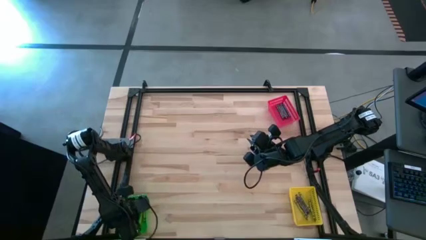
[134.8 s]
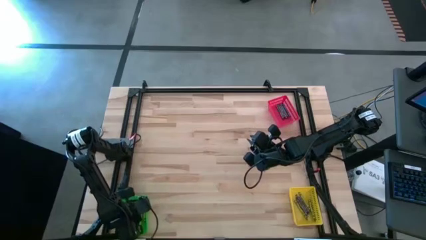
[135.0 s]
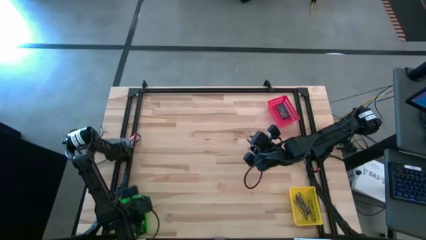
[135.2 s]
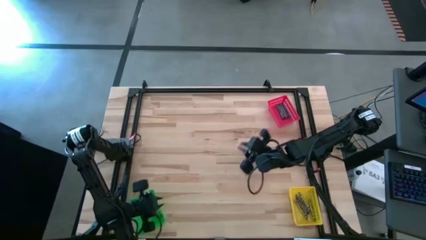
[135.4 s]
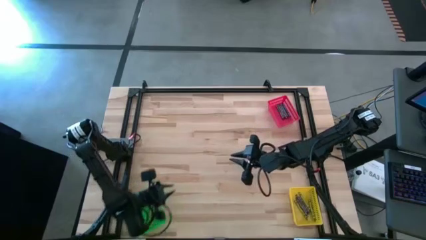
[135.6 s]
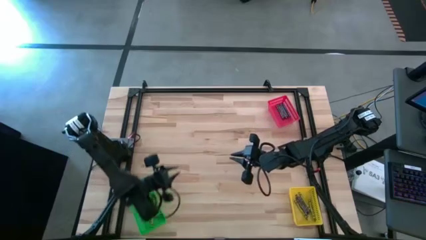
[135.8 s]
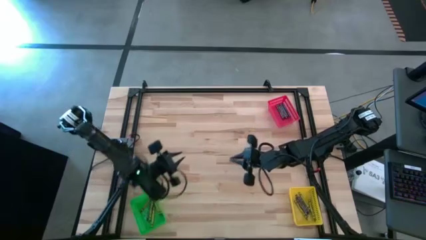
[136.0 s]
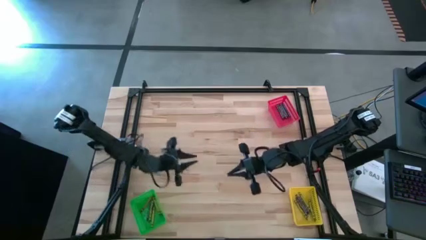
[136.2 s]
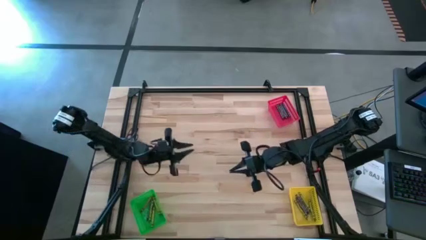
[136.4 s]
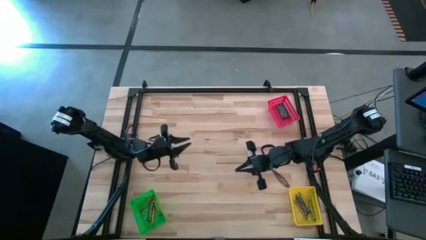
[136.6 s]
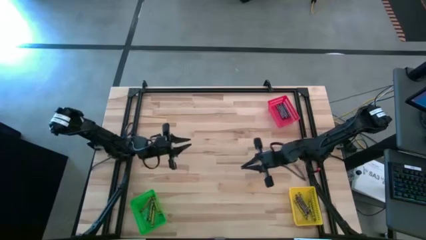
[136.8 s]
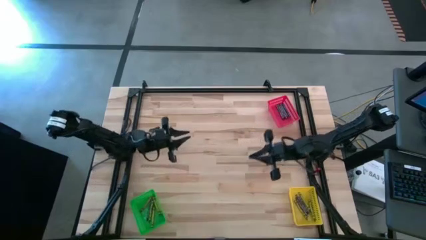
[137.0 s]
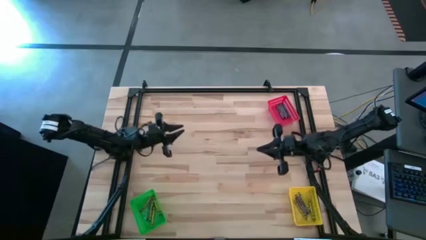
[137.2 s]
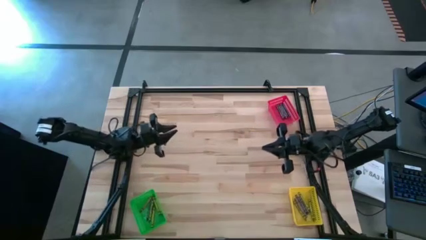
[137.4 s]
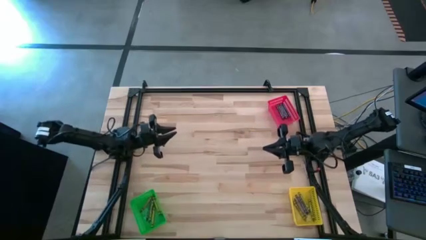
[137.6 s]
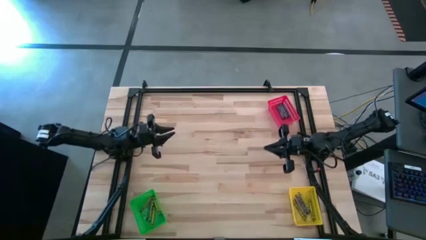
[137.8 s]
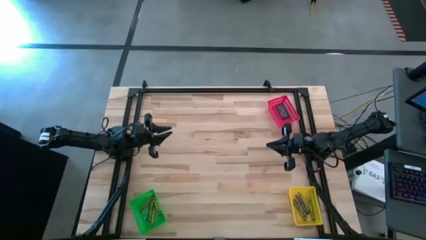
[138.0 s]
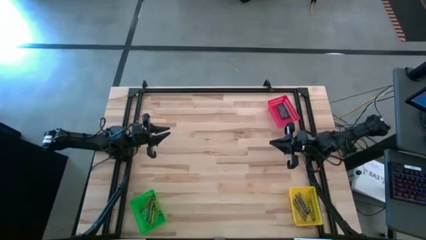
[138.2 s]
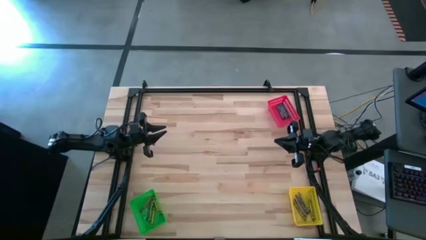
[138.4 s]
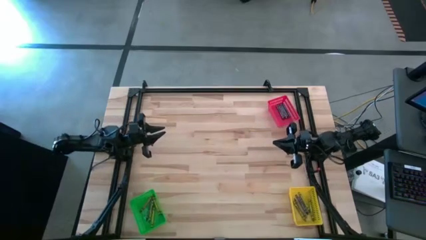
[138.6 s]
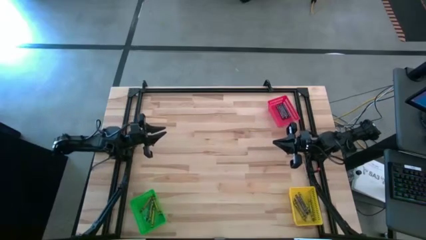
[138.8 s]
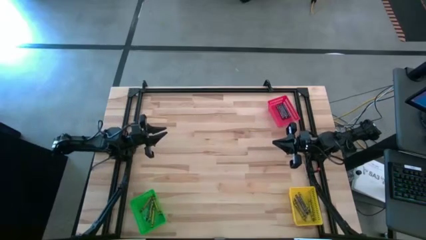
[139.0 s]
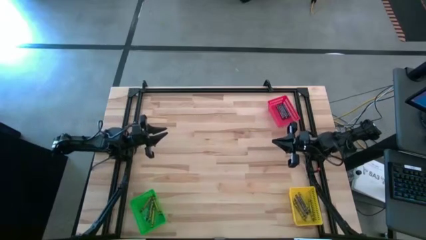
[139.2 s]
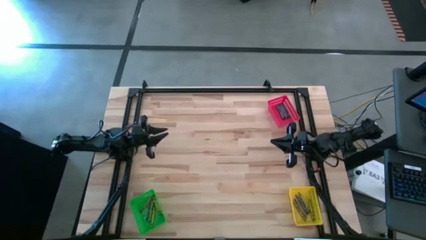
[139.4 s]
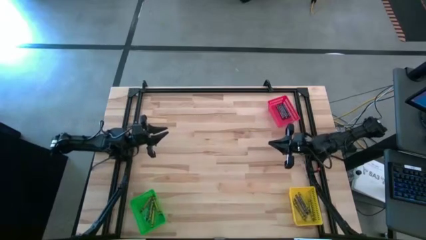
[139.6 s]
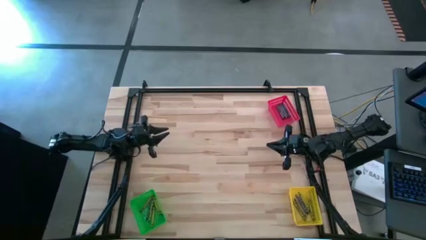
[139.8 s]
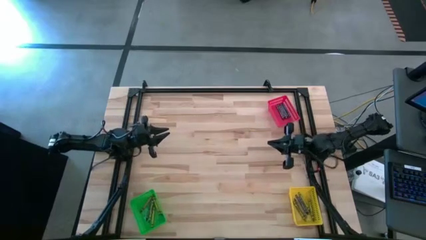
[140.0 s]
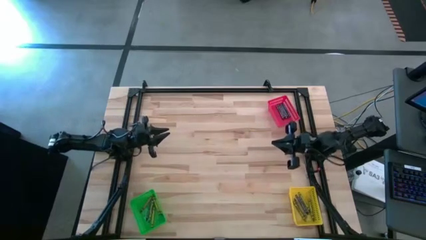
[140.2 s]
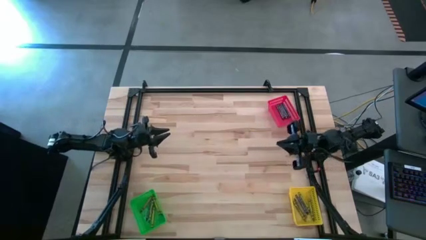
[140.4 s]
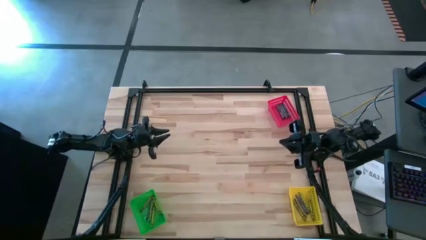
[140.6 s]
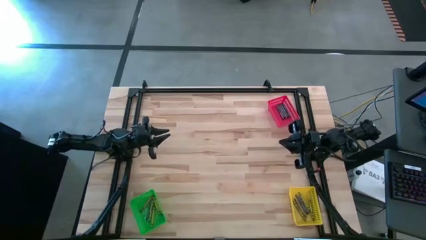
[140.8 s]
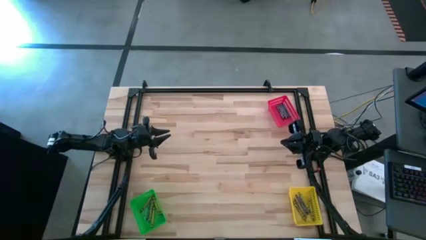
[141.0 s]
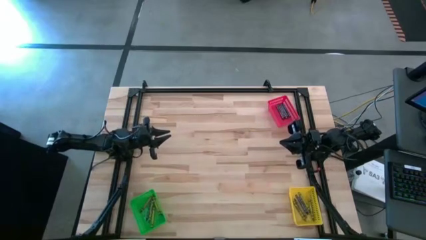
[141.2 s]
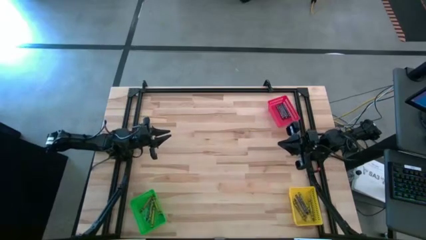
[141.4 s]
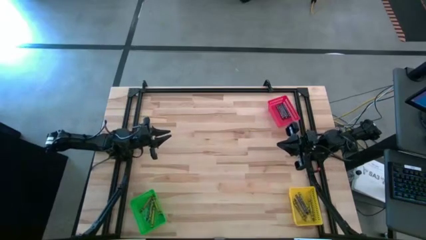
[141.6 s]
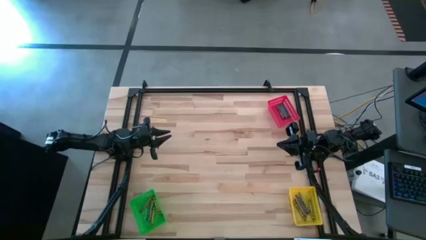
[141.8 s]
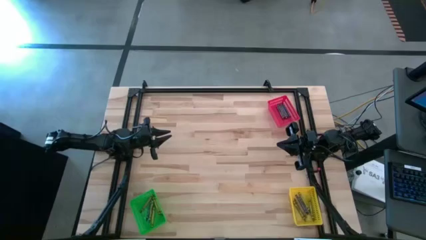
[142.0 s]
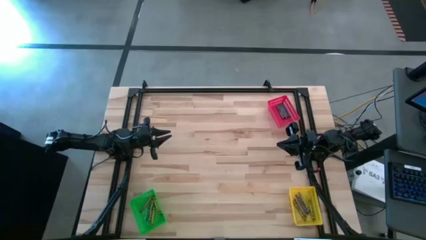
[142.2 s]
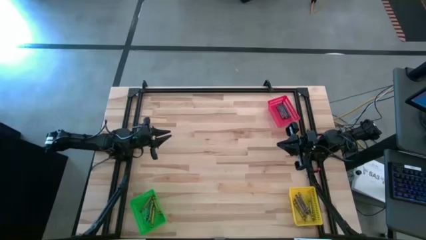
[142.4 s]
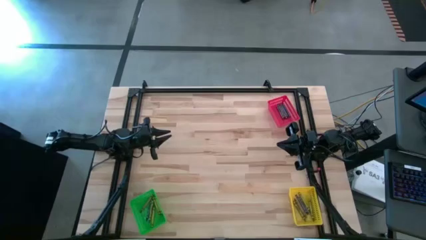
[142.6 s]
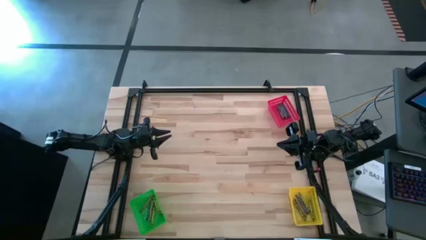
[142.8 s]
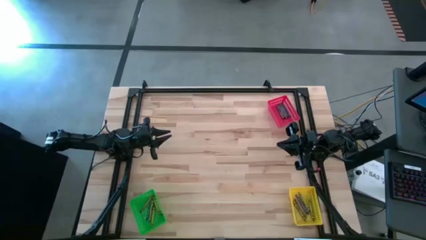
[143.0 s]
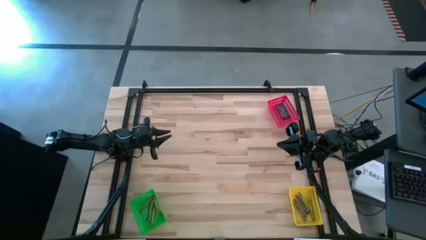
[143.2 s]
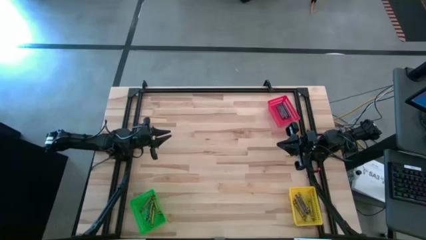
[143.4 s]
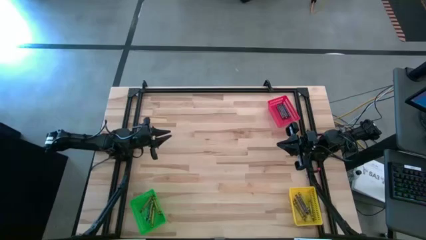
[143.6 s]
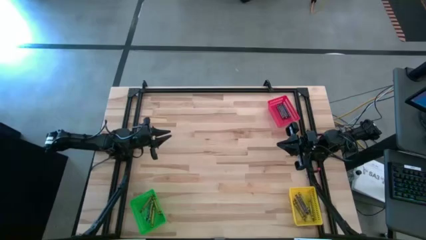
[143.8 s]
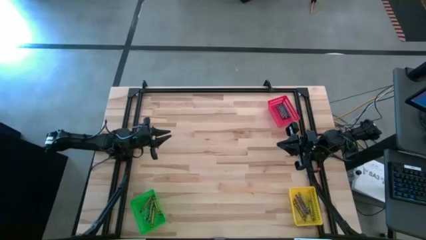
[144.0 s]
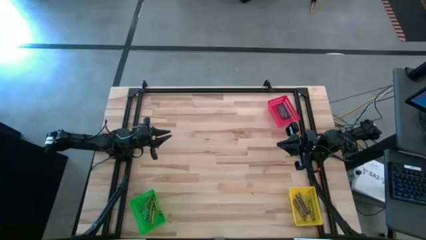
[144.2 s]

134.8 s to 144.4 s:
Task: Sort crayons
Return to Home Position

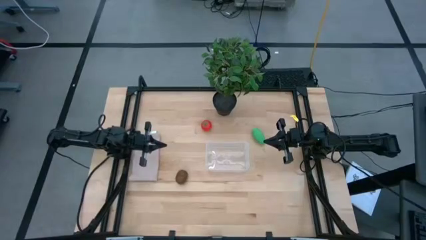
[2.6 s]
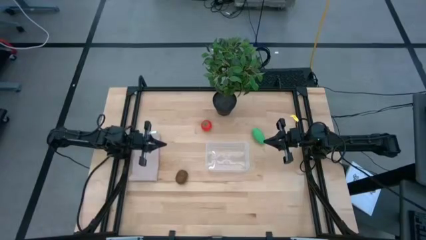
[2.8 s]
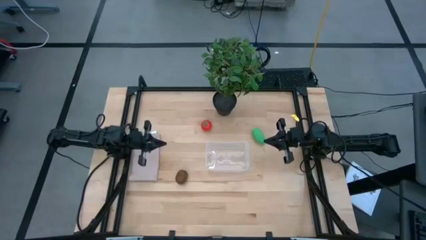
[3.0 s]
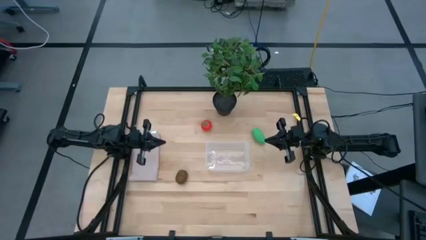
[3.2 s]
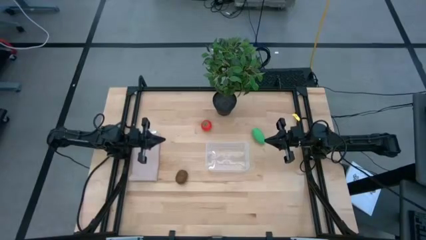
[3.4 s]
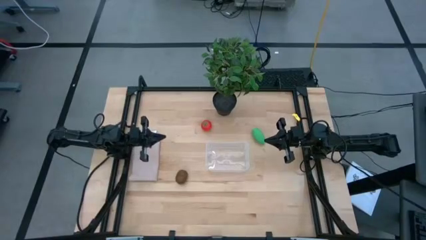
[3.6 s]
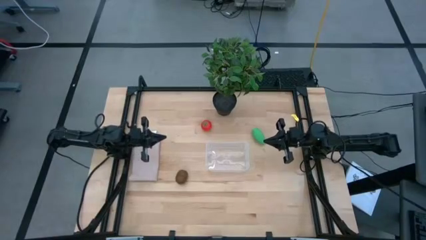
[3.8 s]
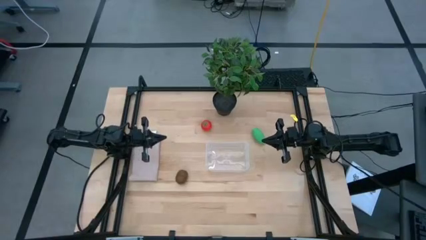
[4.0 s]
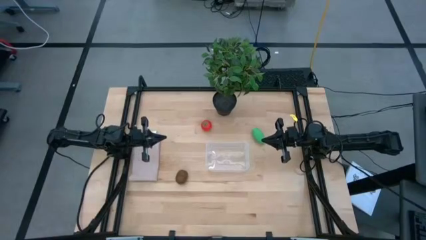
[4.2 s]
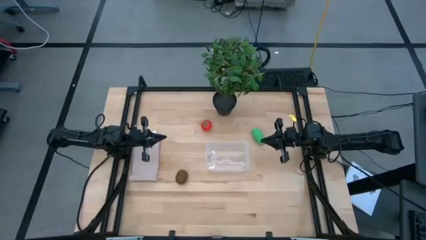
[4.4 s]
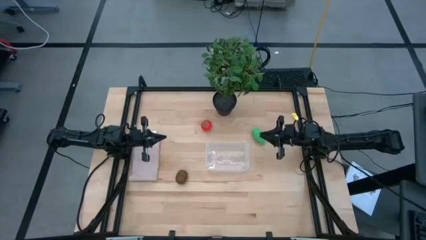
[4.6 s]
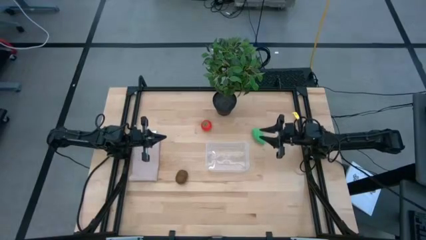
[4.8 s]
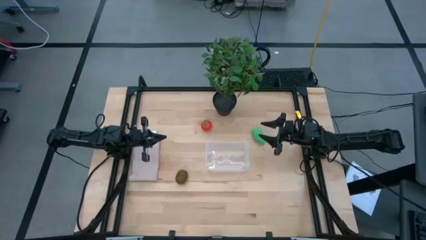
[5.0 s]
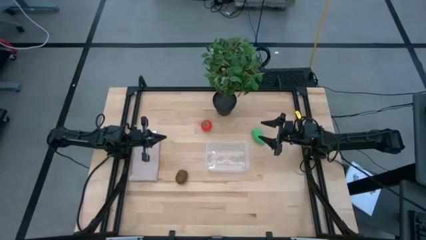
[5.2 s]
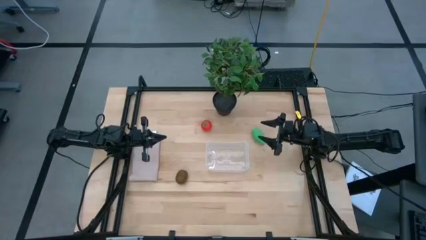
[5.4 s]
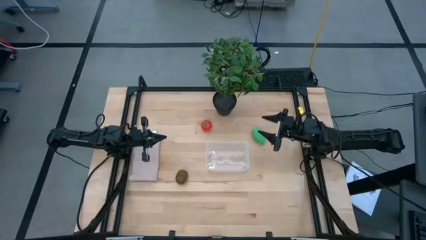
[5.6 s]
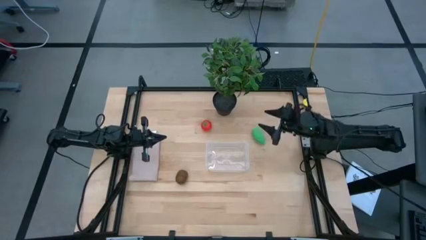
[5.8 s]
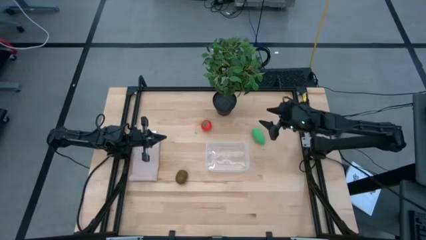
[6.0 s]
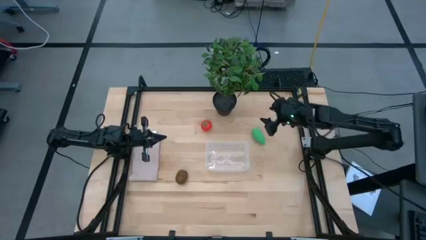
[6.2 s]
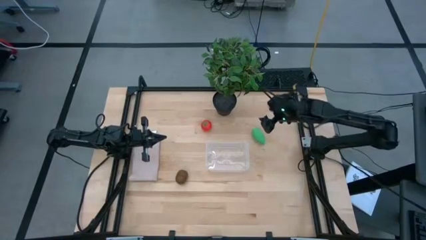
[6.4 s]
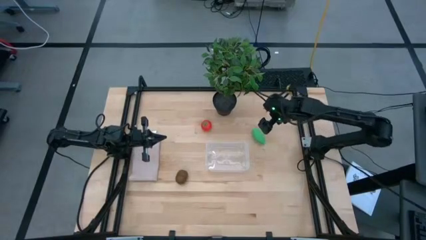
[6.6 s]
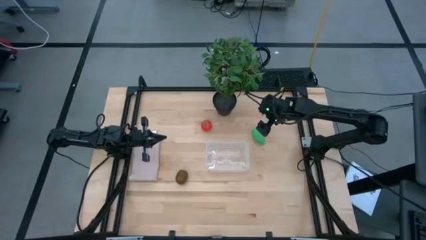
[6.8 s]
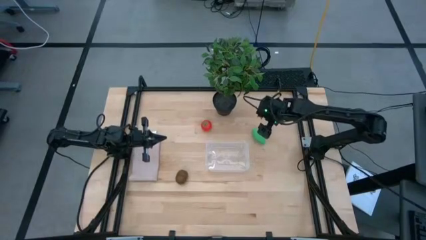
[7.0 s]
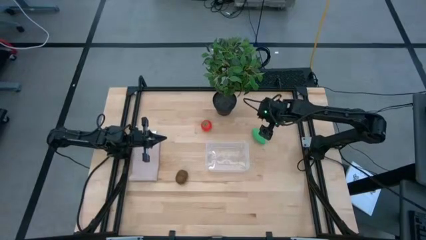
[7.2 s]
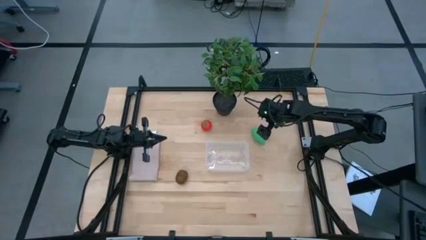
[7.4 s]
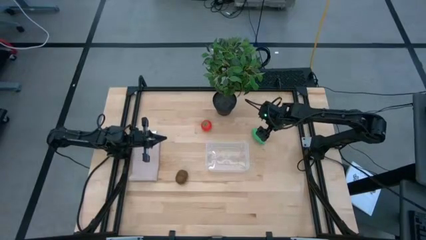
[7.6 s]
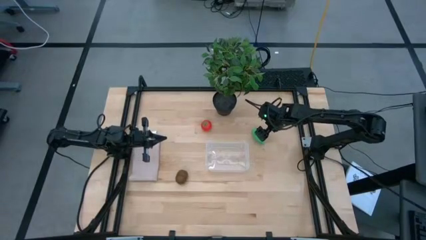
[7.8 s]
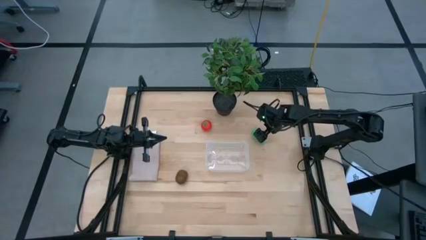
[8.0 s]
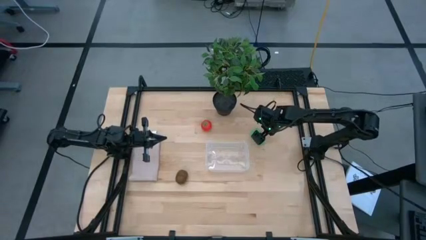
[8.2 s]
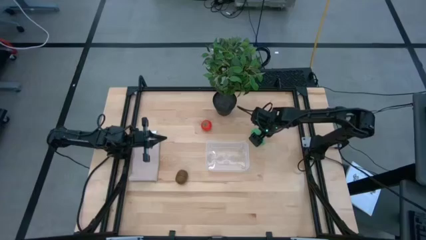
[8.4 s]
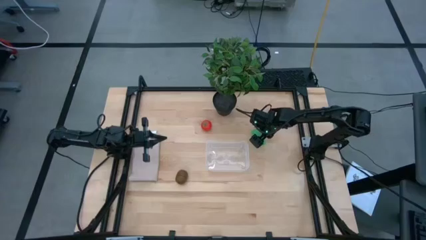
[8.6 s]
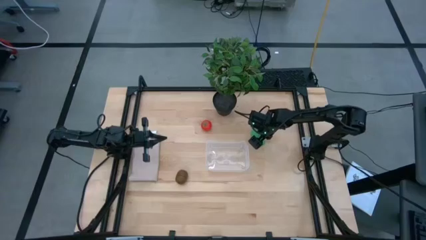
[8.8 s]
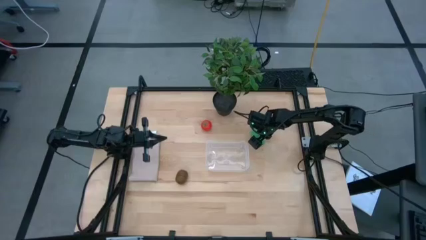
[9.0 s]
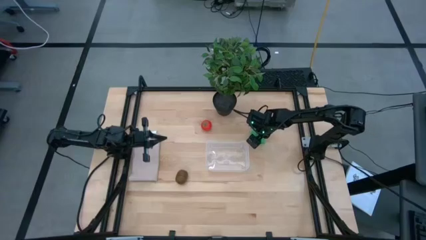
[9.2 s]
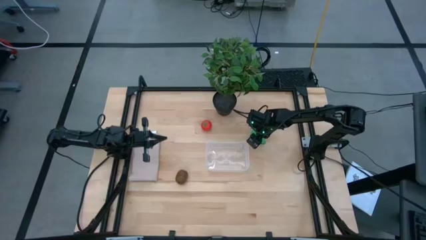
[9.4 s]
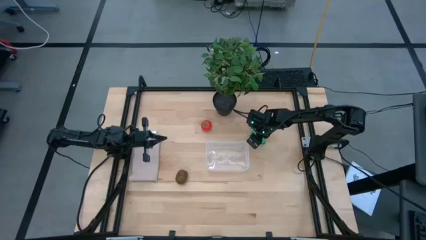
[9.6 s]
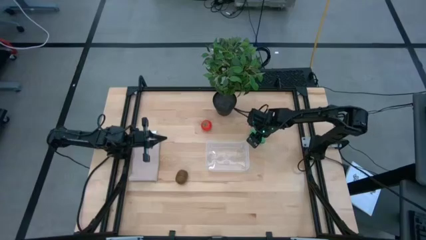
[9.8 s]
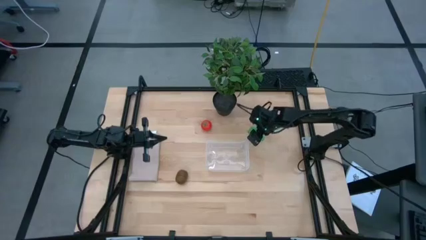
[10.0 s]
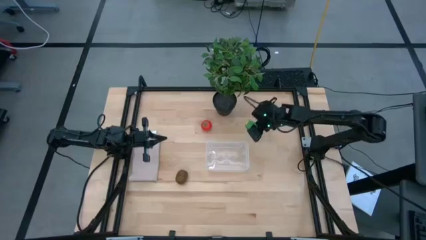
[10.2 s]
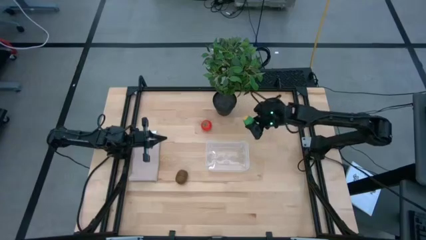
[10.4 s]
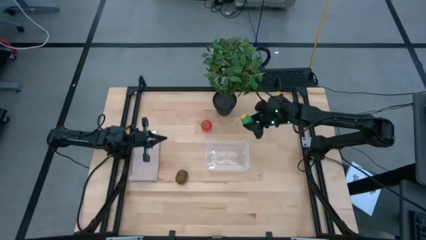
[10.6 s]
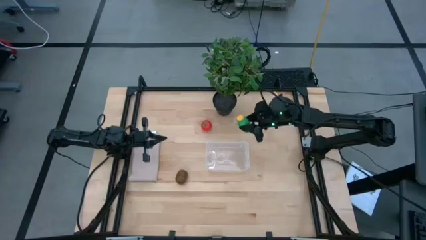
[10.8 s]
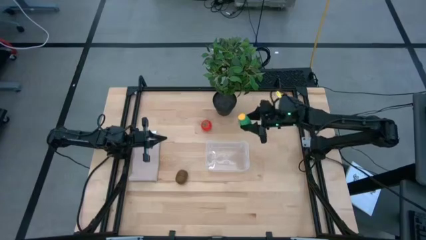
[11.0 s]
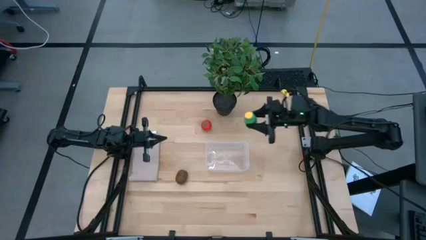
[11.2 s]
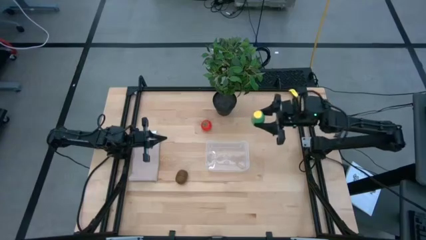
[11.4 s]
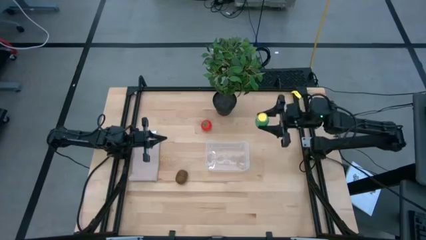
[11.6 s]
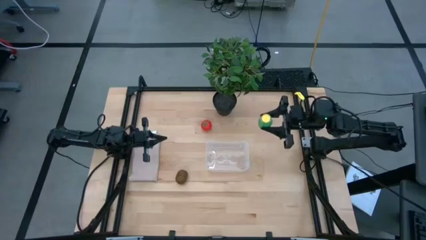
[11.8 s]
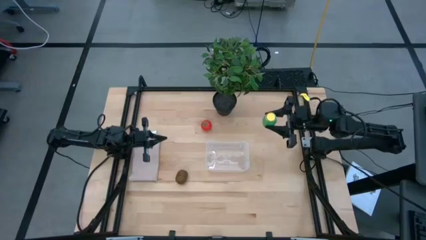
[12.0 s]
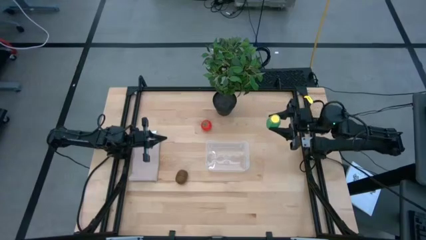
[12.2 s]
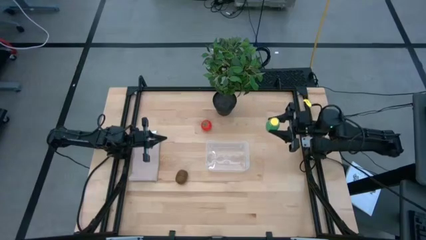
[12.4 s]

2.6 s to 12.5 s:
Task: Pick and placing Produce into tupperware
Put the green corn into the transparent bin
